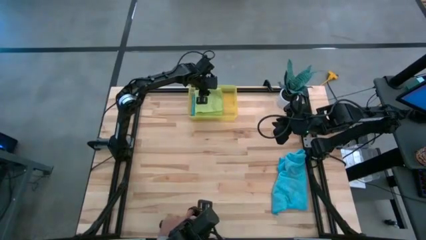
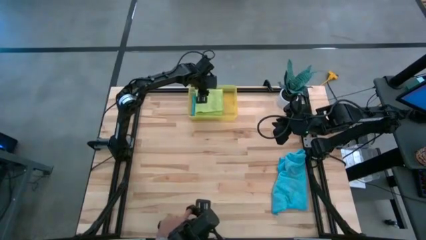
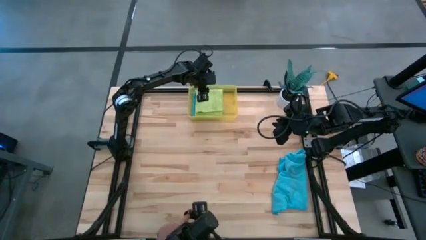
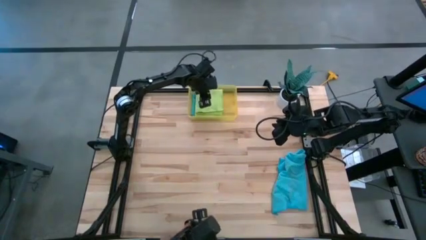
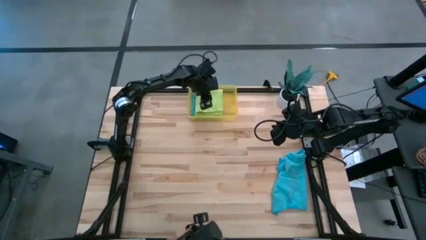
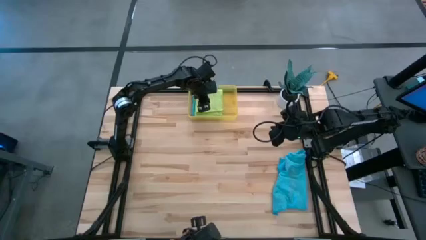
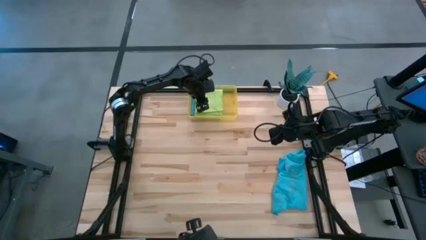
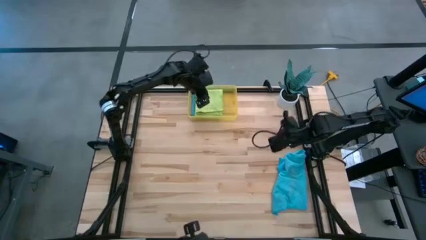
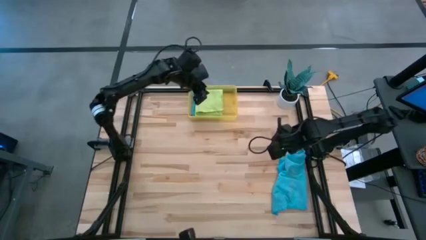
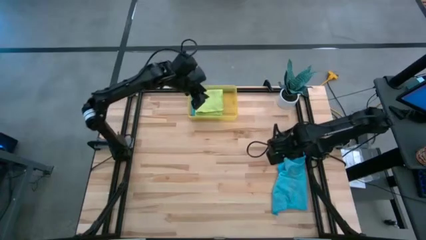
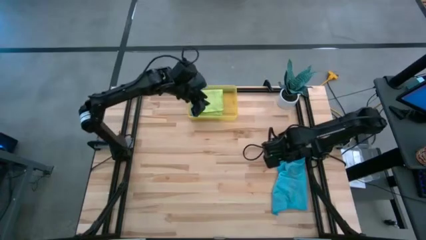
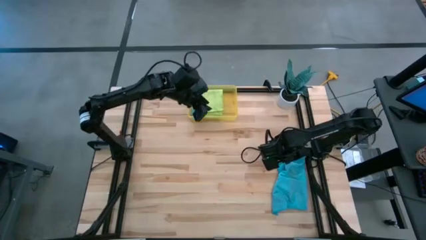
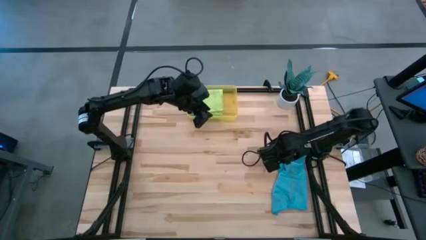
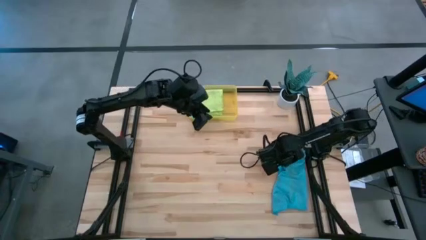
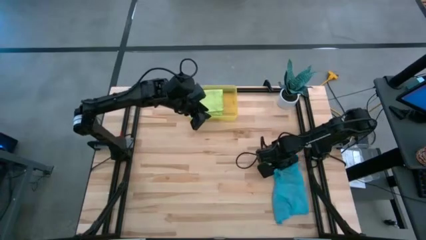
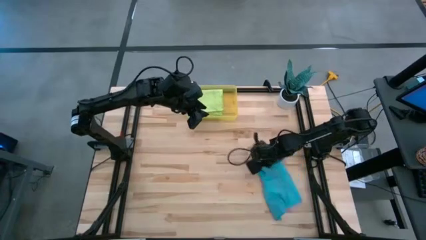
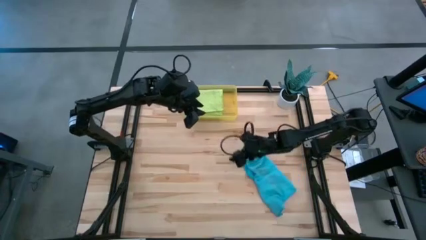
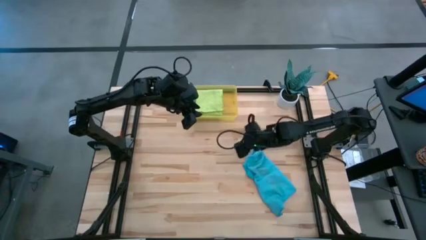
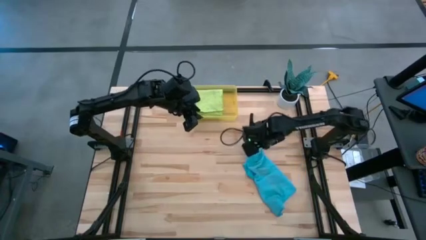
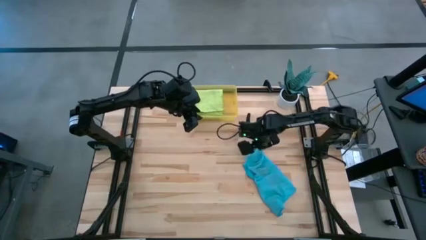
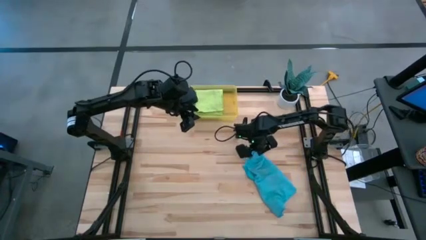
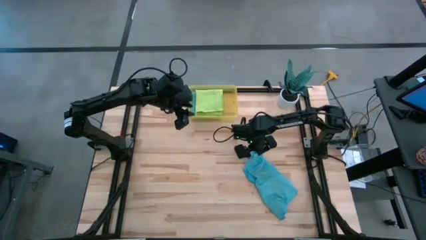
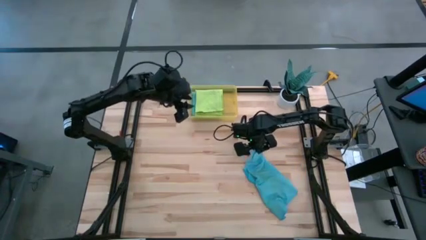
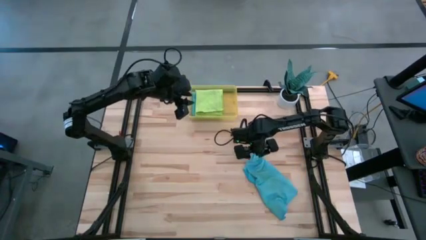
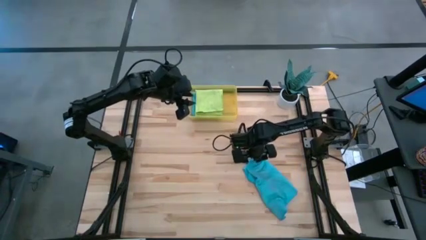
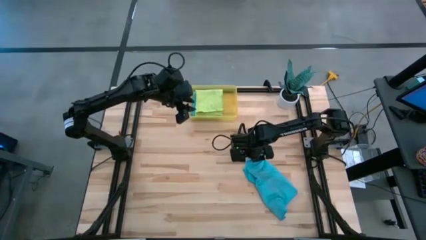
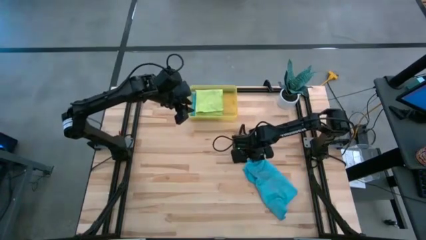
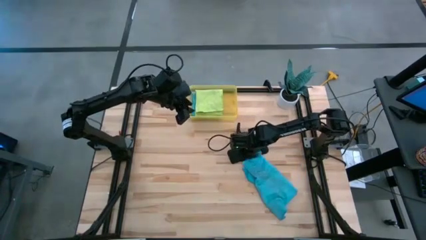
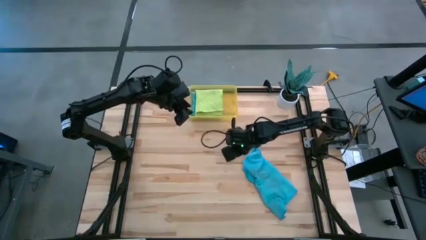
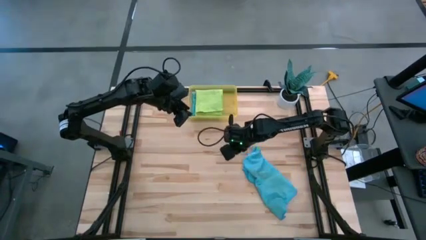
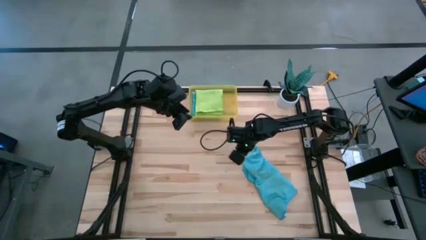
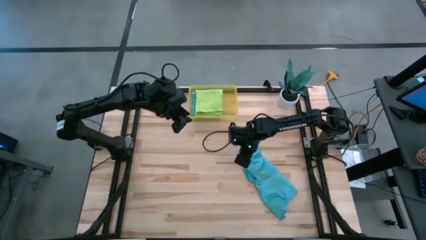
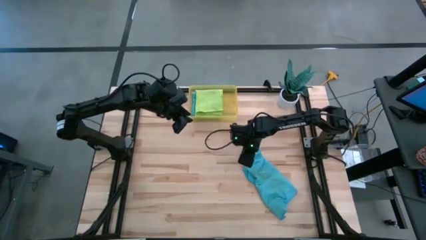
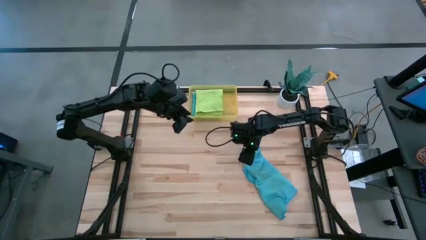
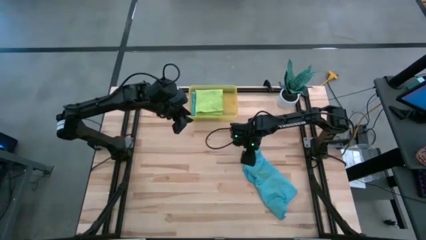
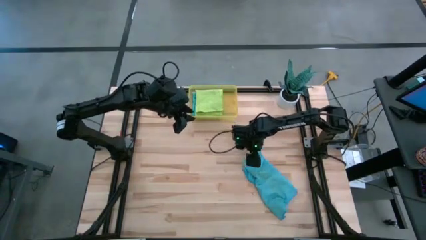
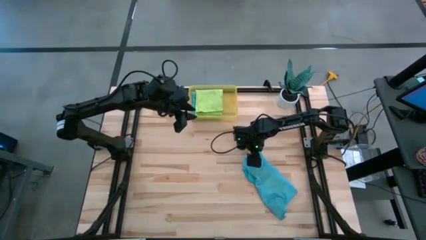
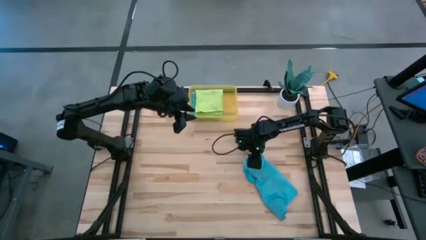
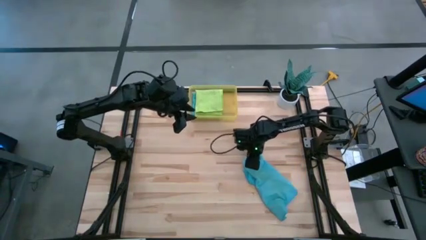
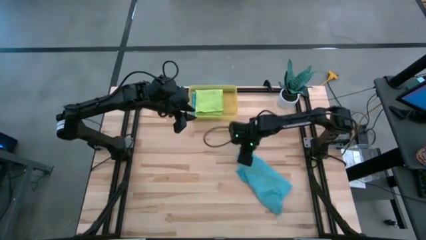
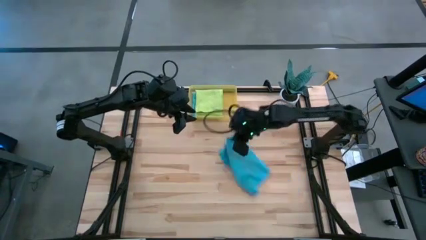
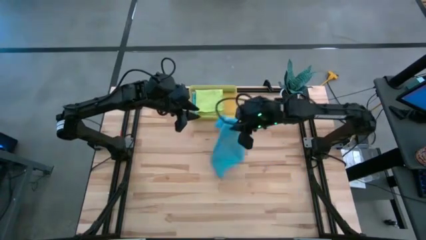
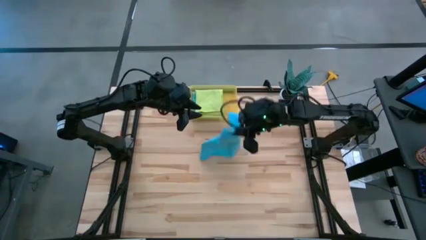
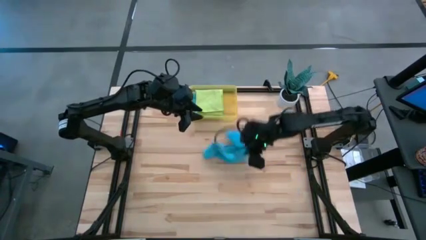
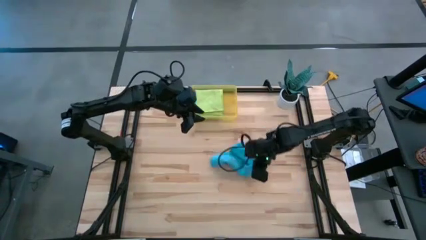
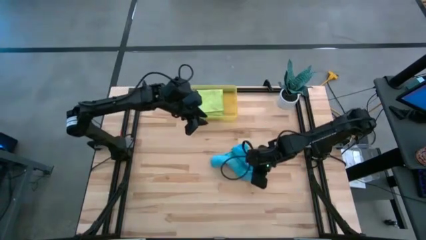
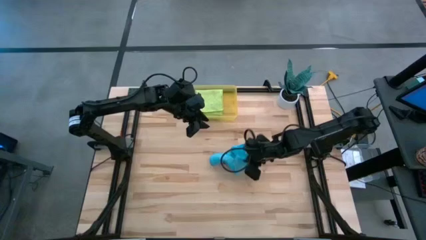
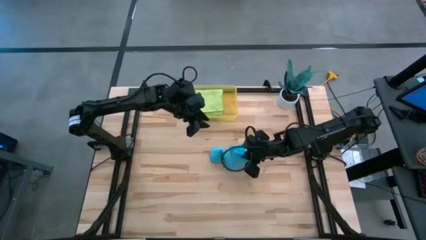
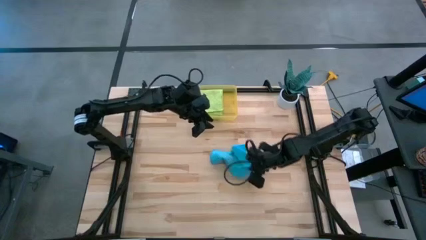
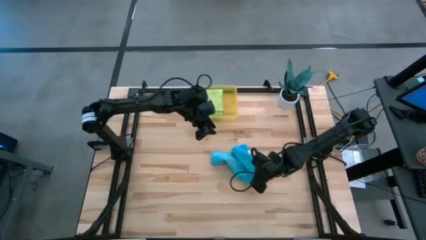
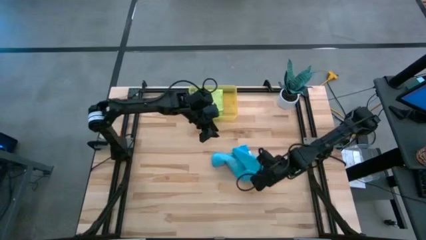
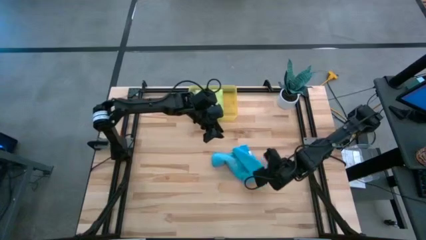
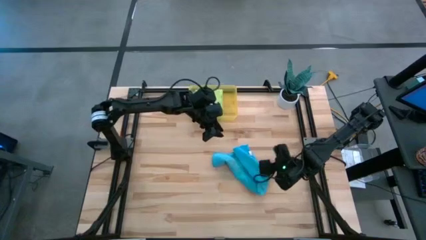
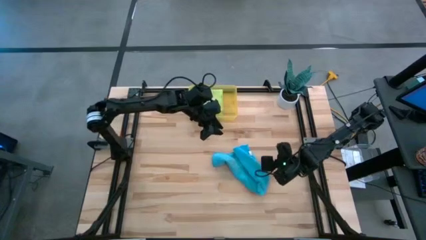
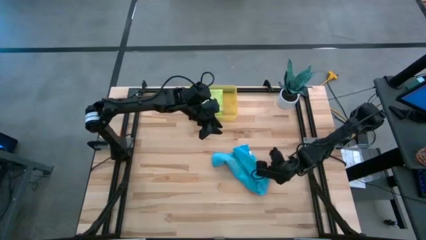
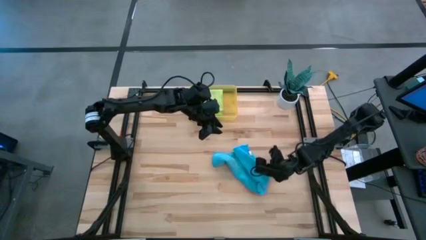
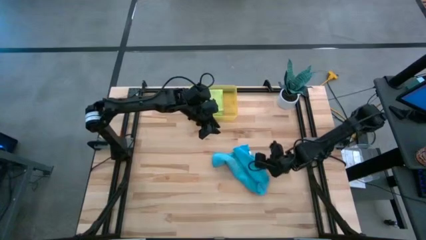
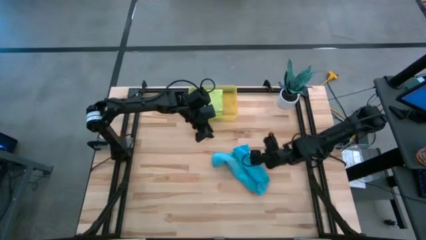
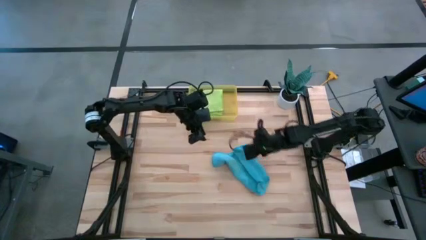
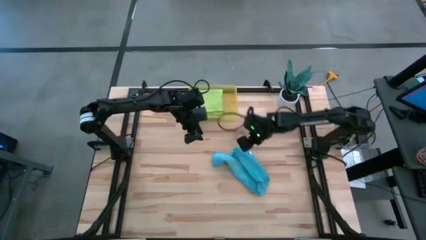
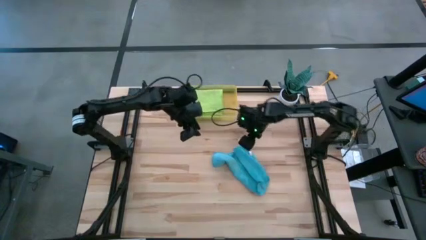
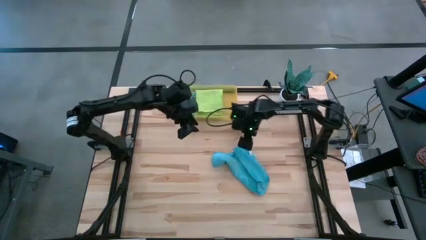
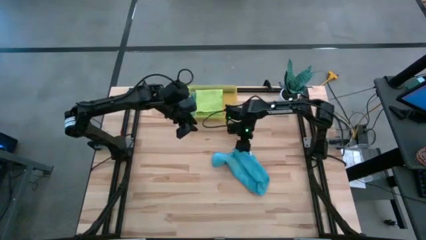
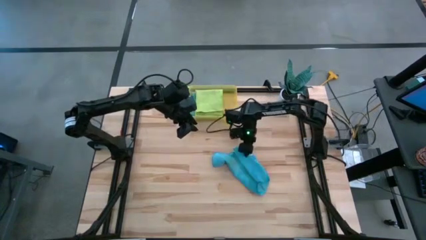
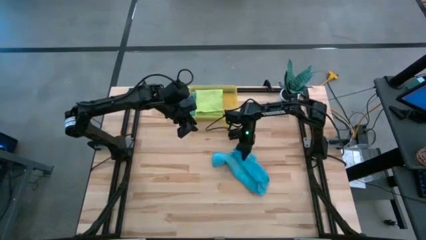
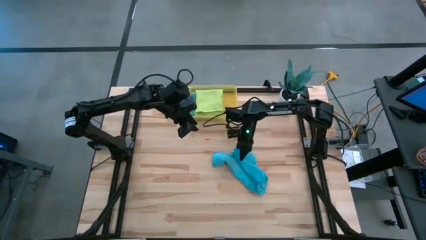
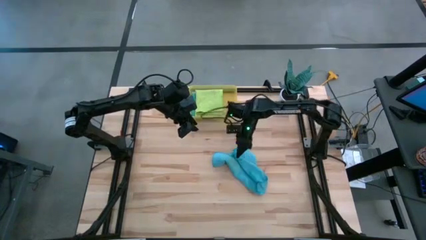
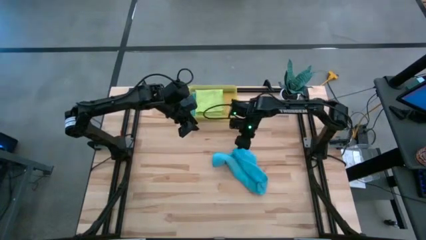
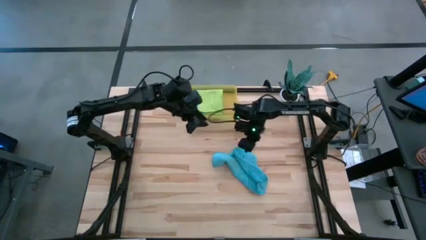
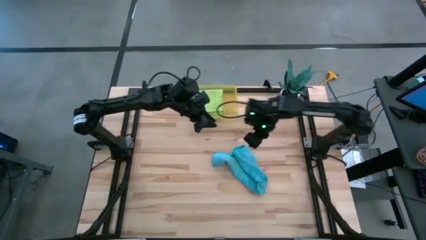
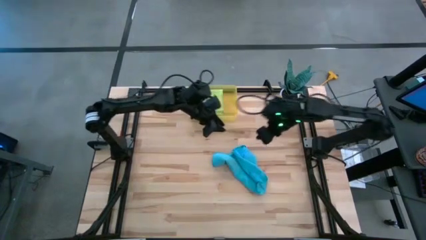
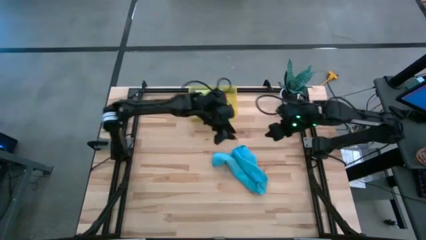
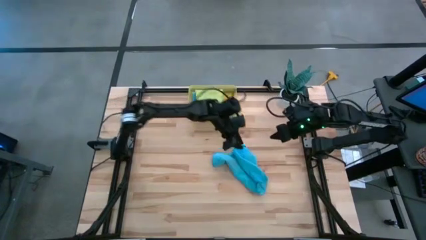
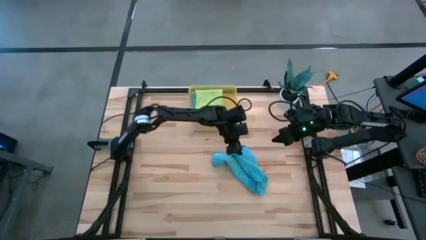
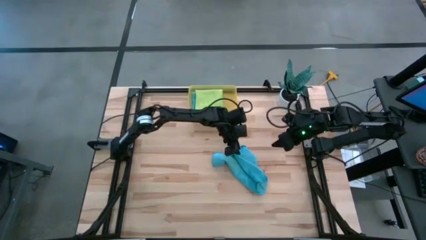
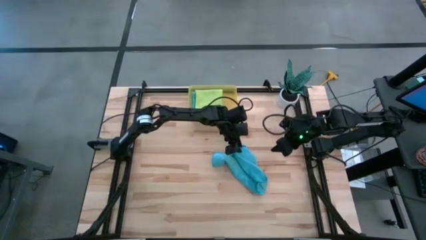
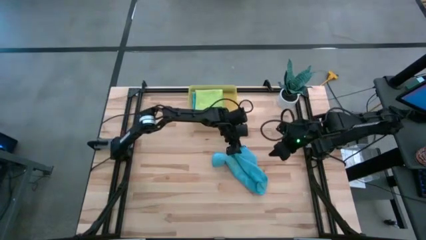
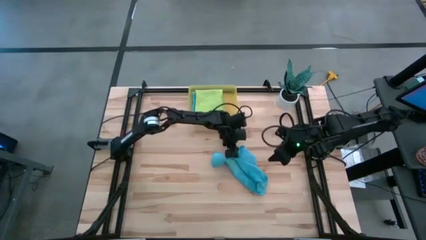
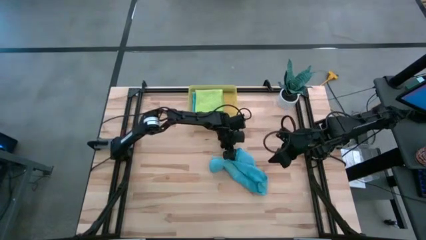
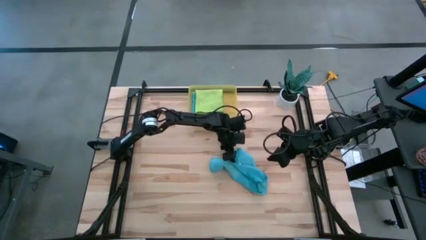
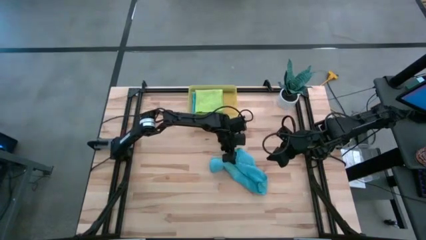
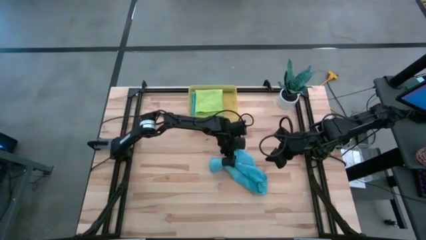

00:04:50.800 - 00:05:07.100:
Task: Fold microfiber towels
Fold the blue microfiber cloth

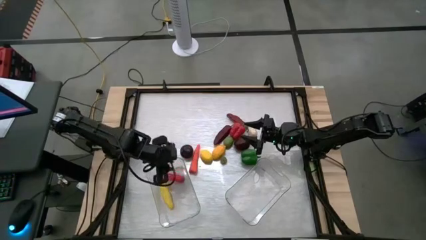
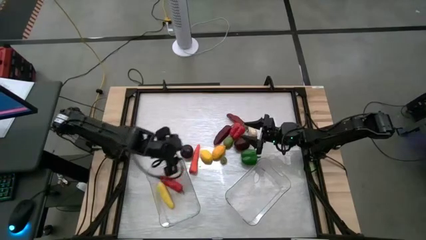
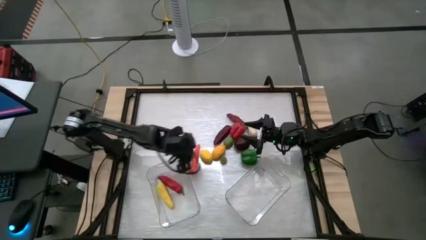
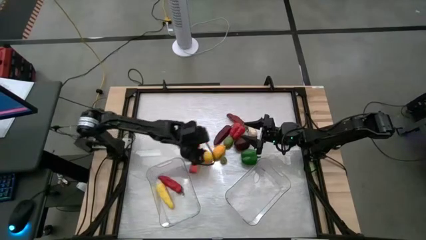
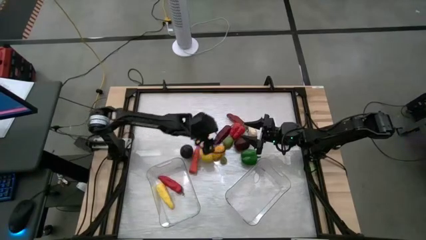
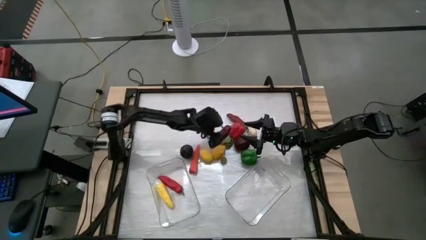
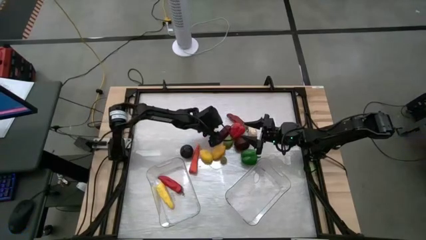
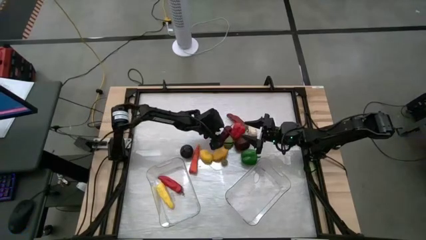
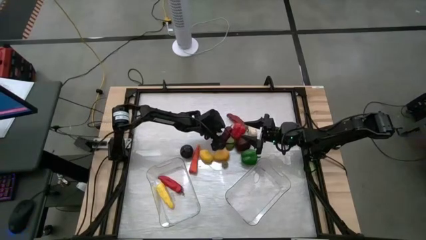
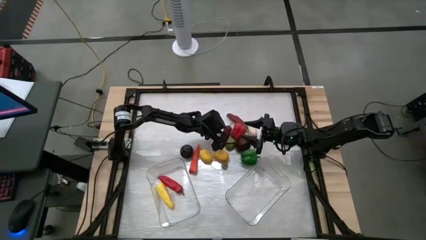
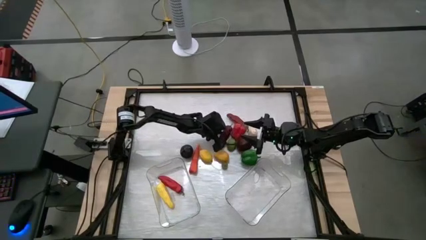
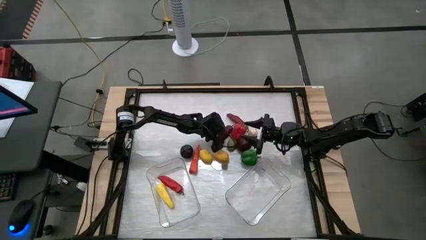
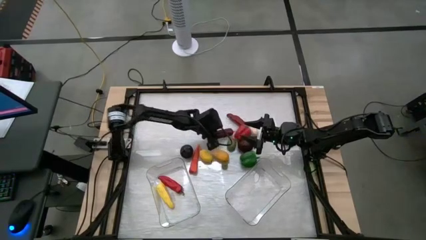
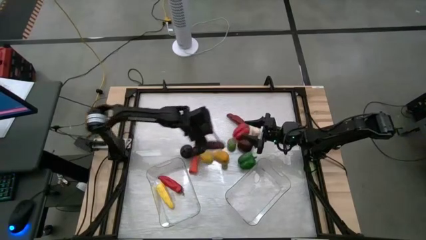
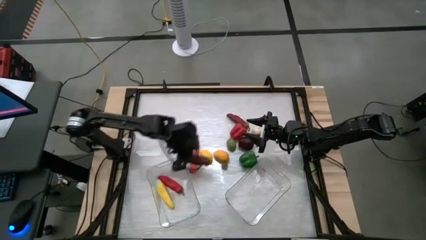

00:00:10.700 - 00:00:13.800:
Task: Sort produce into baskets
Put the red chili pepper into the left transparent bin
